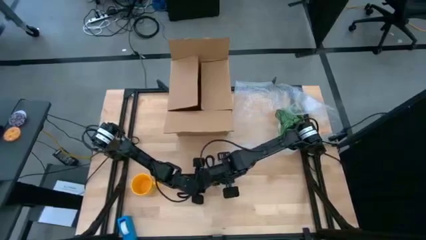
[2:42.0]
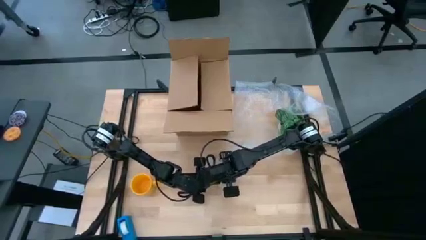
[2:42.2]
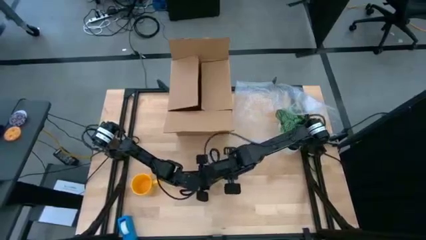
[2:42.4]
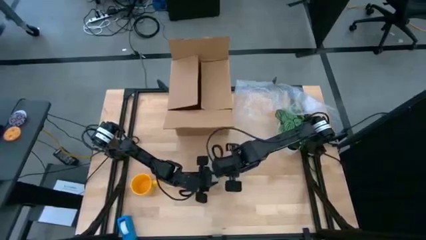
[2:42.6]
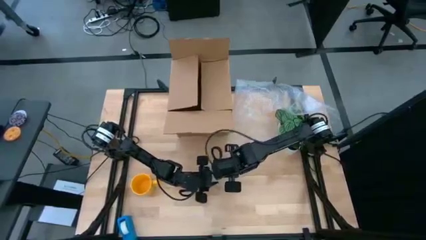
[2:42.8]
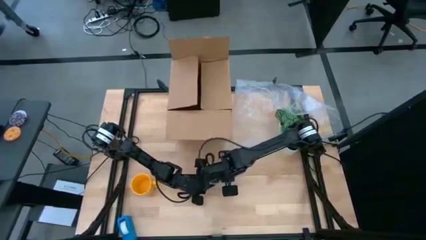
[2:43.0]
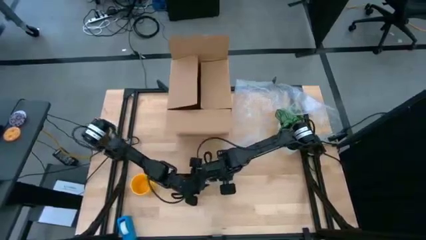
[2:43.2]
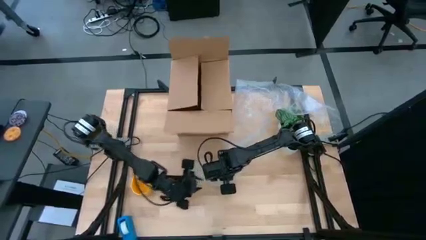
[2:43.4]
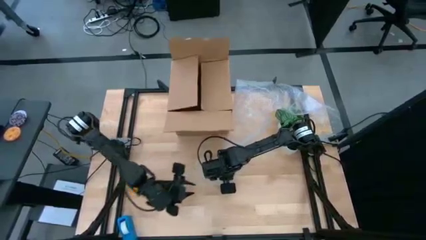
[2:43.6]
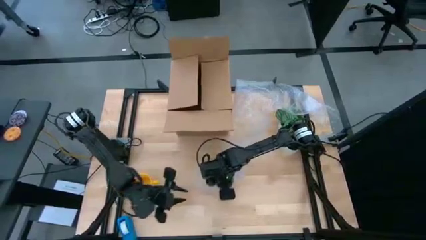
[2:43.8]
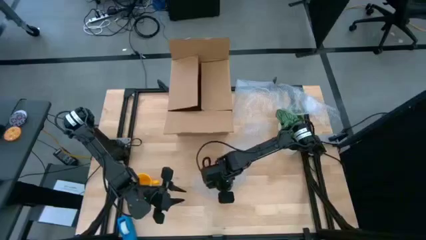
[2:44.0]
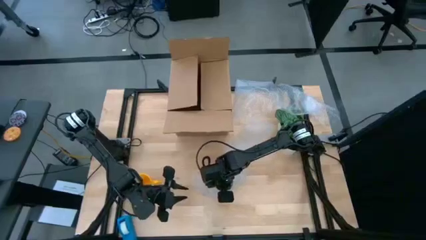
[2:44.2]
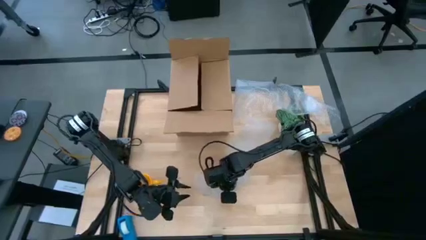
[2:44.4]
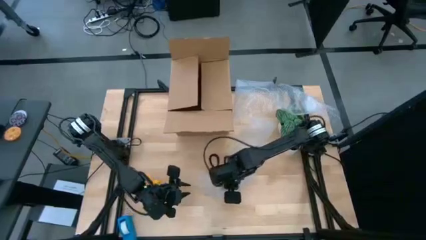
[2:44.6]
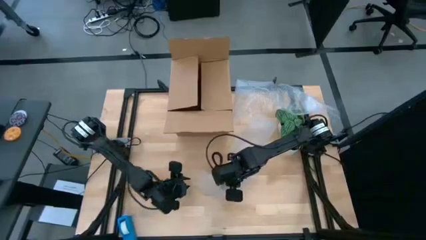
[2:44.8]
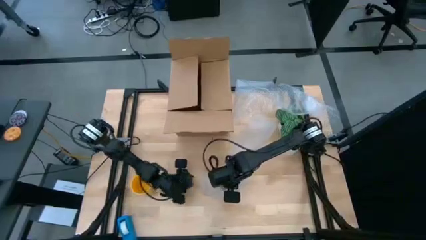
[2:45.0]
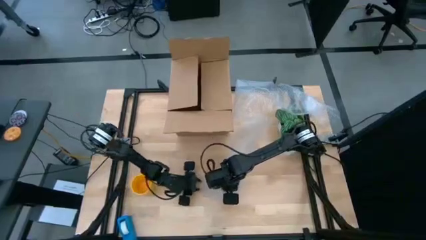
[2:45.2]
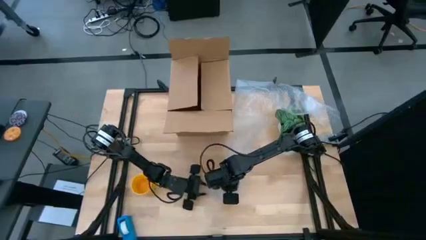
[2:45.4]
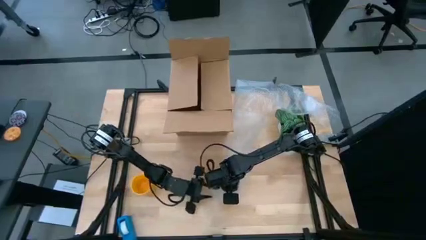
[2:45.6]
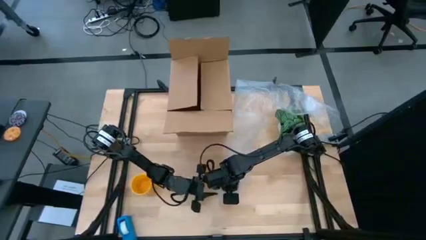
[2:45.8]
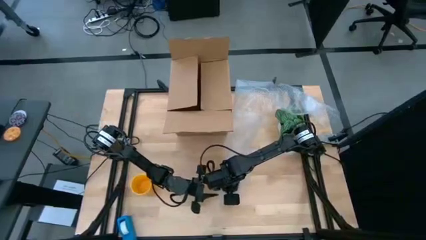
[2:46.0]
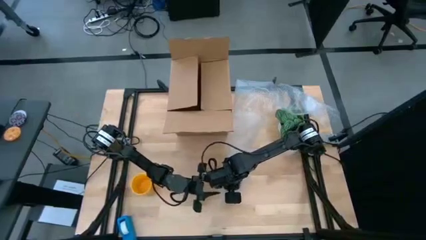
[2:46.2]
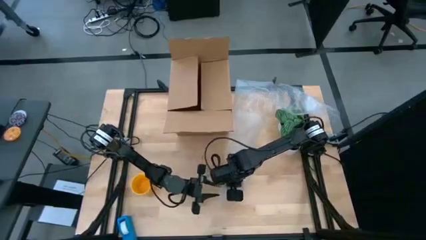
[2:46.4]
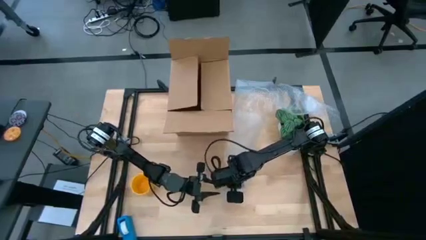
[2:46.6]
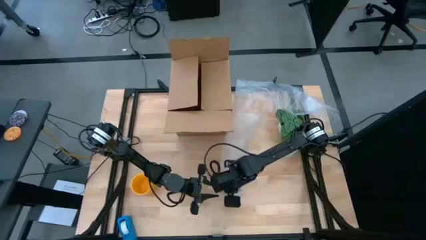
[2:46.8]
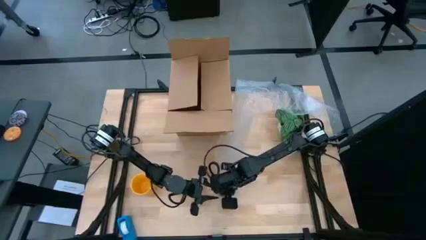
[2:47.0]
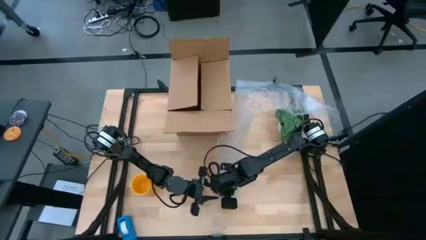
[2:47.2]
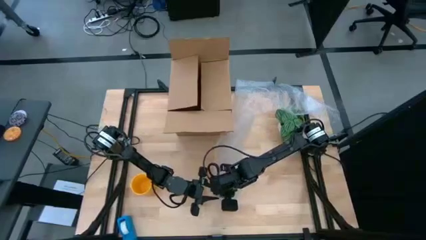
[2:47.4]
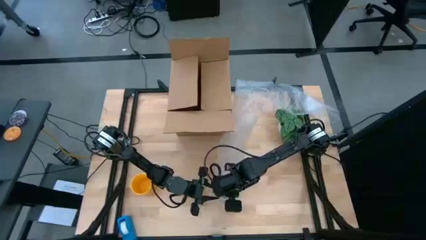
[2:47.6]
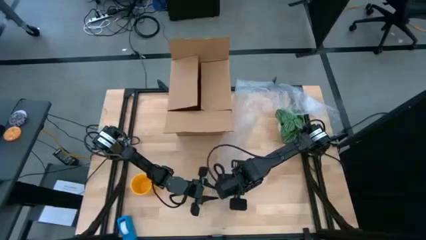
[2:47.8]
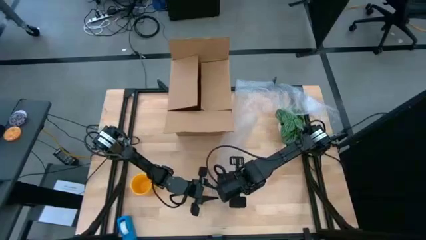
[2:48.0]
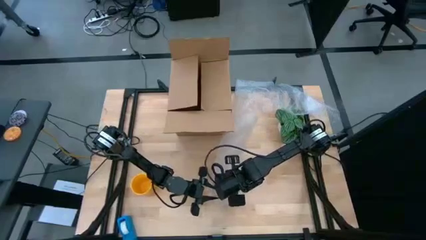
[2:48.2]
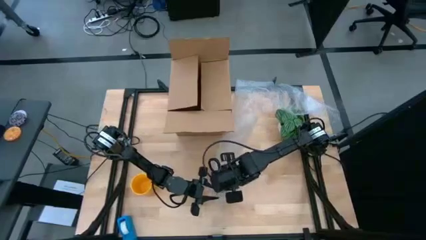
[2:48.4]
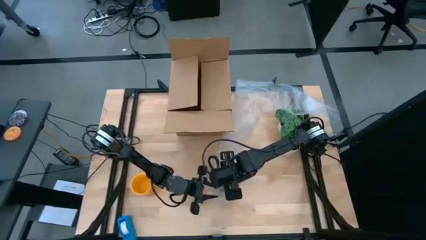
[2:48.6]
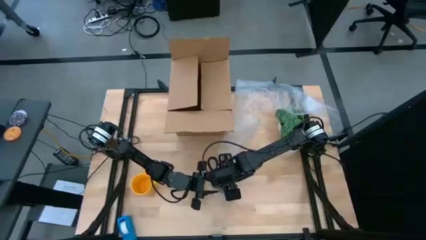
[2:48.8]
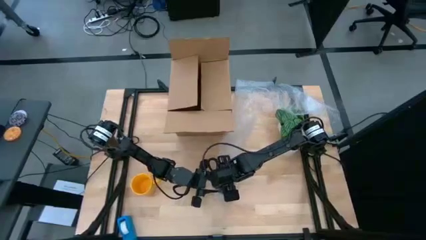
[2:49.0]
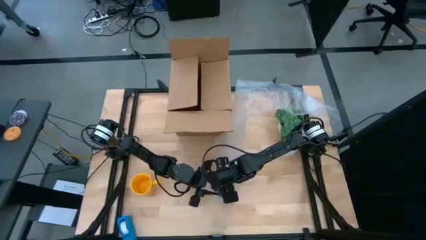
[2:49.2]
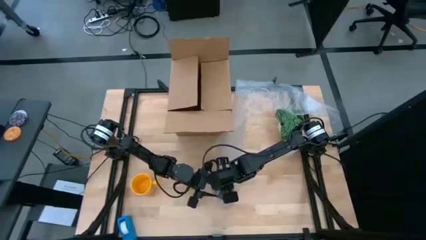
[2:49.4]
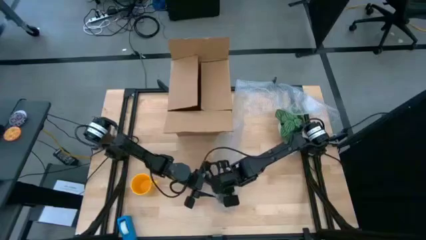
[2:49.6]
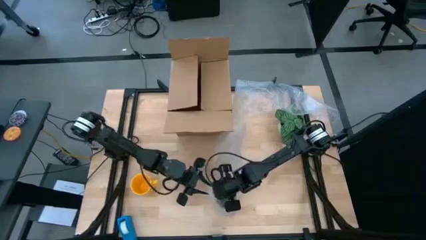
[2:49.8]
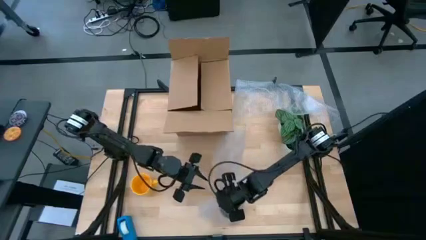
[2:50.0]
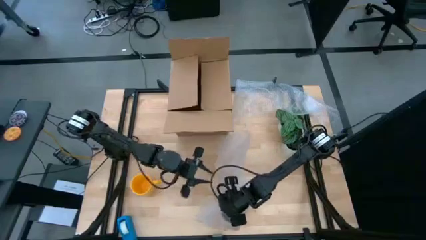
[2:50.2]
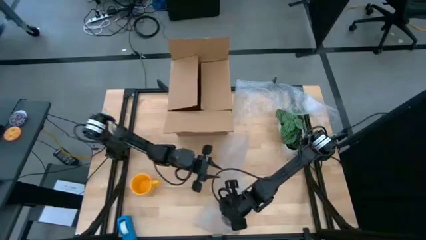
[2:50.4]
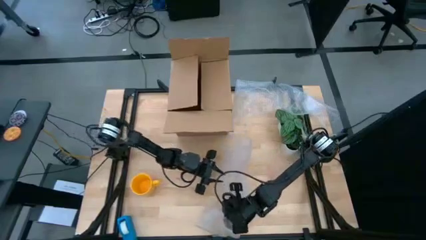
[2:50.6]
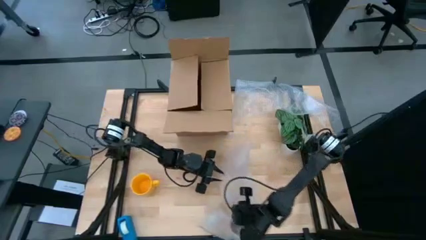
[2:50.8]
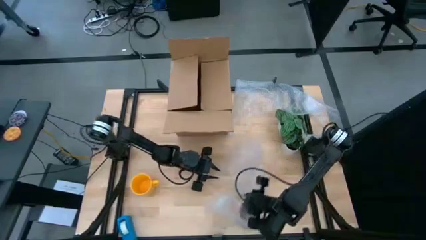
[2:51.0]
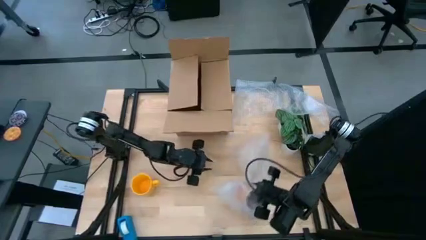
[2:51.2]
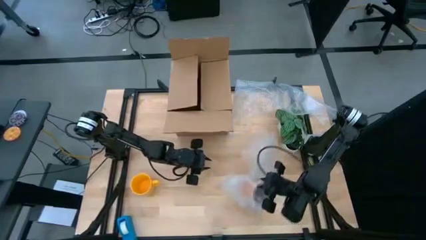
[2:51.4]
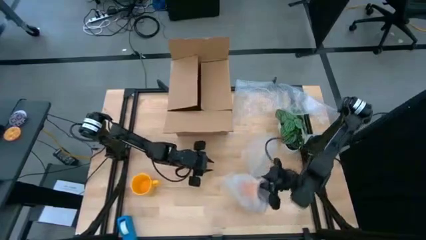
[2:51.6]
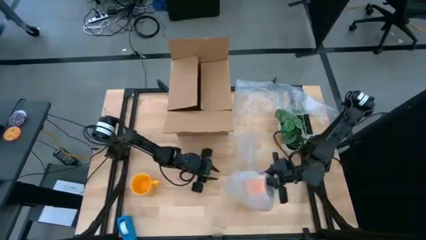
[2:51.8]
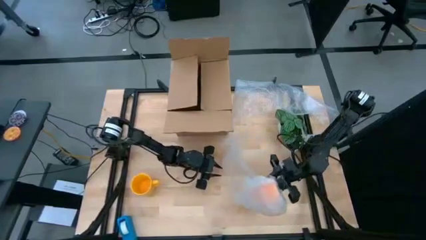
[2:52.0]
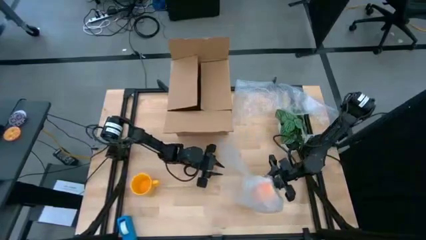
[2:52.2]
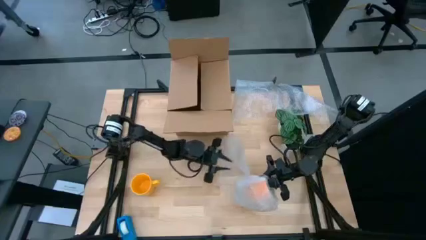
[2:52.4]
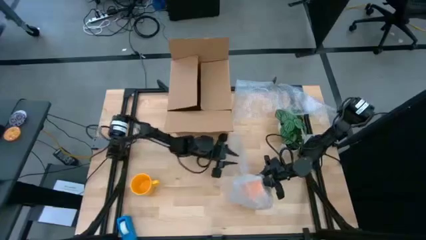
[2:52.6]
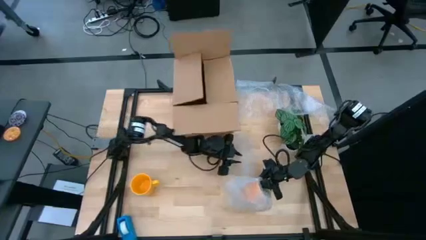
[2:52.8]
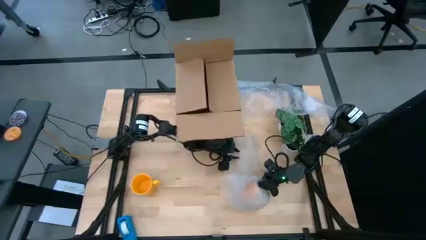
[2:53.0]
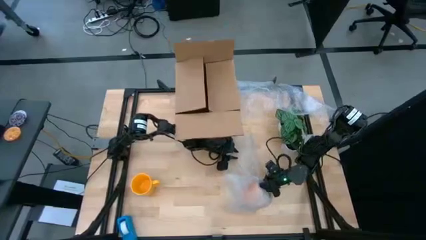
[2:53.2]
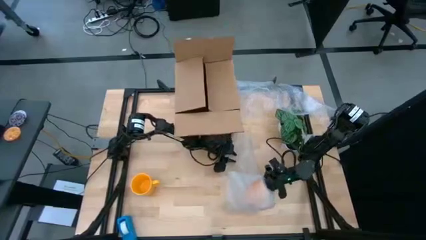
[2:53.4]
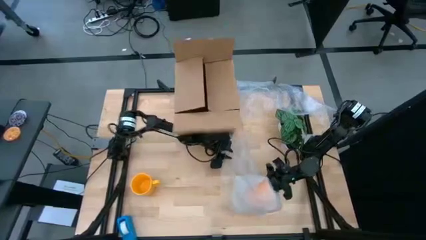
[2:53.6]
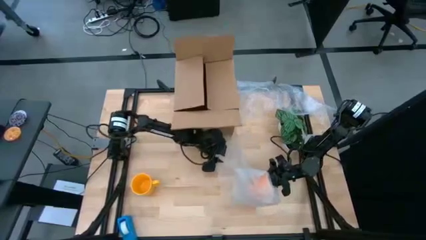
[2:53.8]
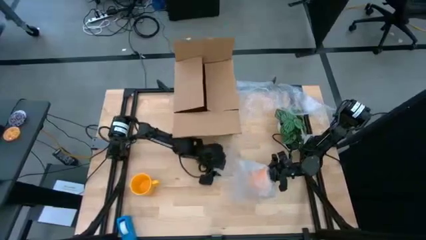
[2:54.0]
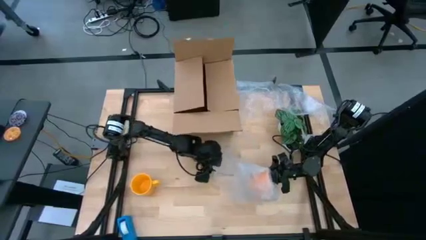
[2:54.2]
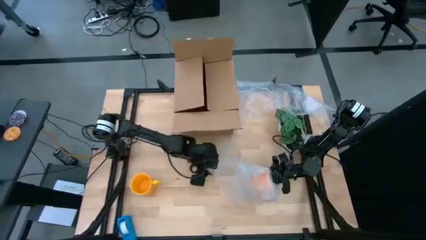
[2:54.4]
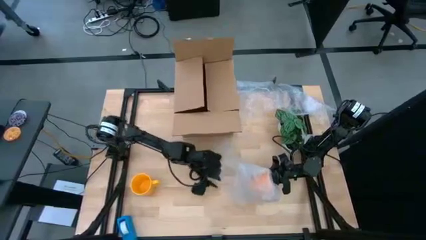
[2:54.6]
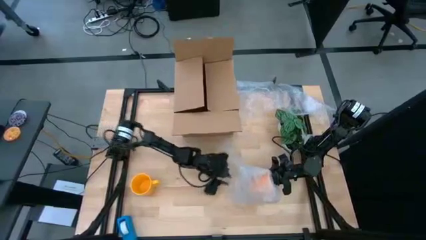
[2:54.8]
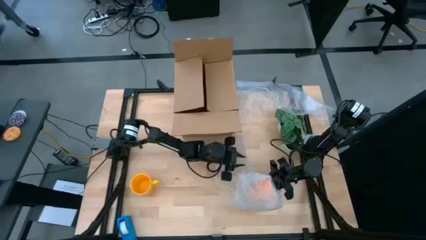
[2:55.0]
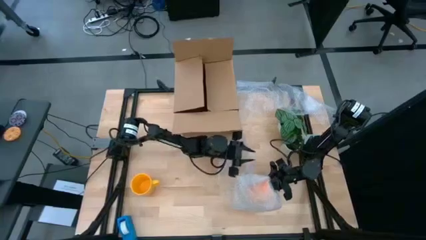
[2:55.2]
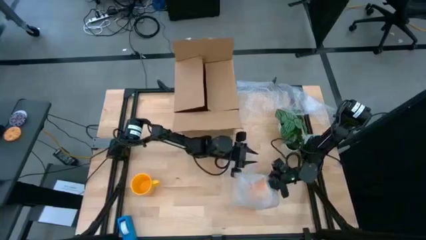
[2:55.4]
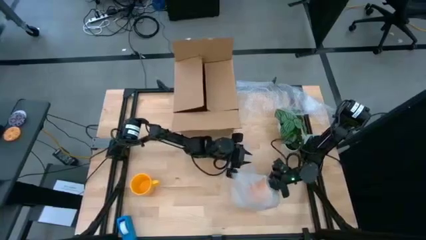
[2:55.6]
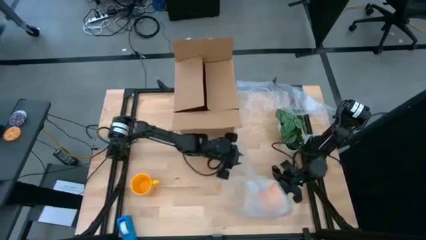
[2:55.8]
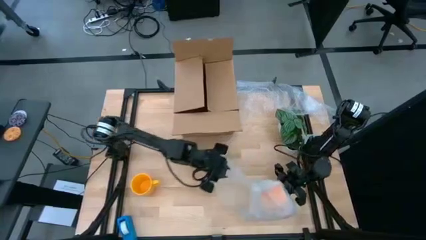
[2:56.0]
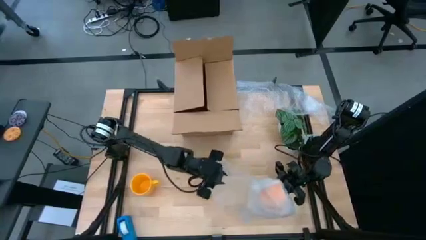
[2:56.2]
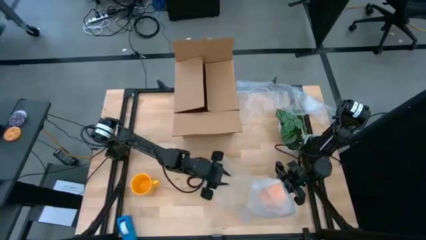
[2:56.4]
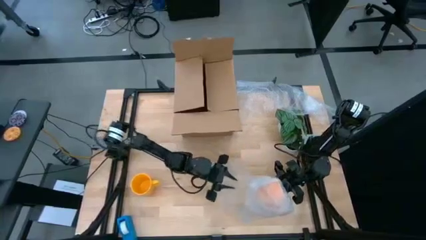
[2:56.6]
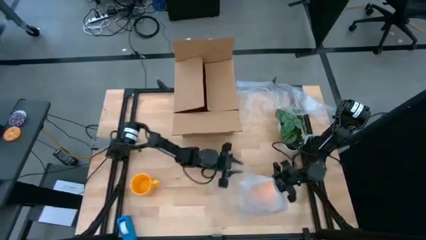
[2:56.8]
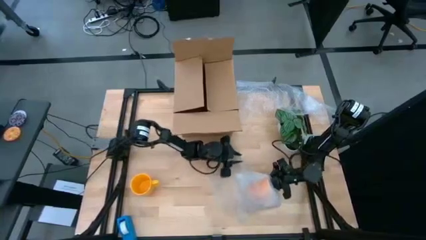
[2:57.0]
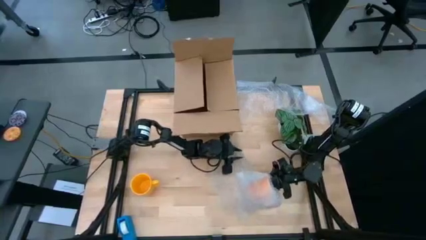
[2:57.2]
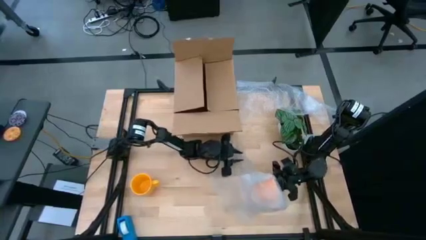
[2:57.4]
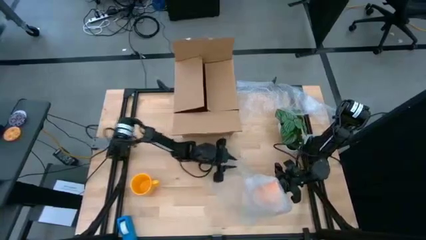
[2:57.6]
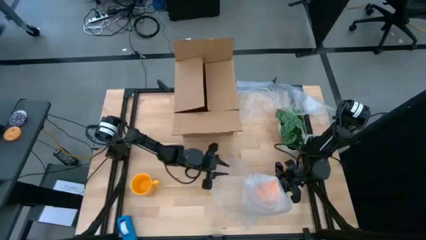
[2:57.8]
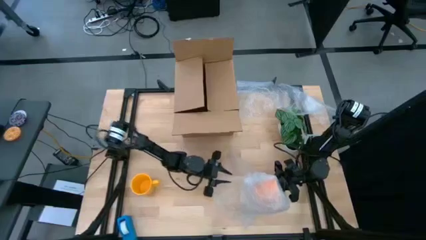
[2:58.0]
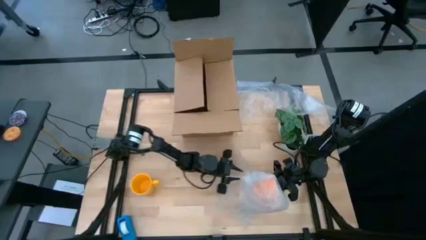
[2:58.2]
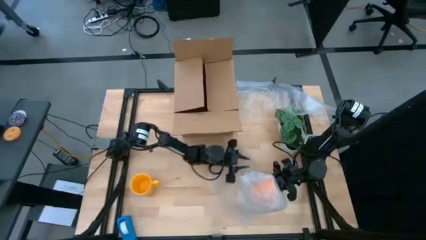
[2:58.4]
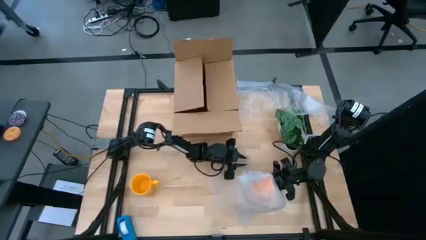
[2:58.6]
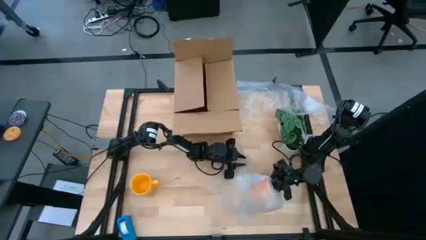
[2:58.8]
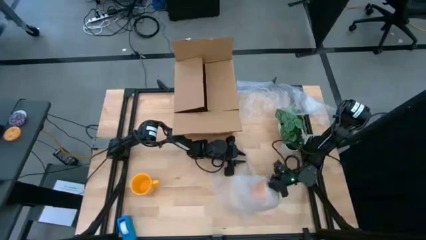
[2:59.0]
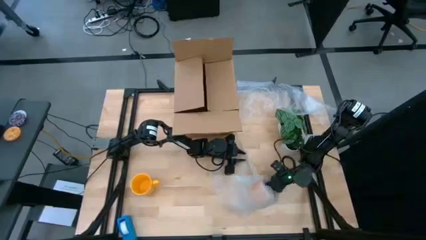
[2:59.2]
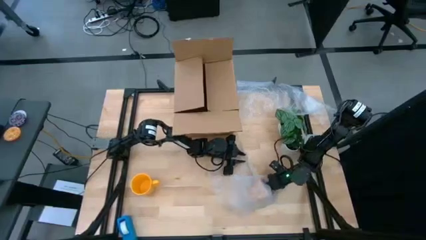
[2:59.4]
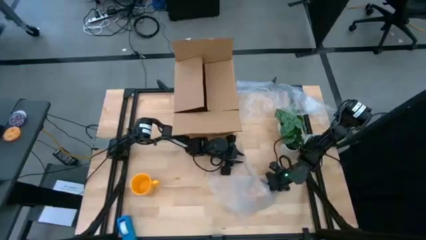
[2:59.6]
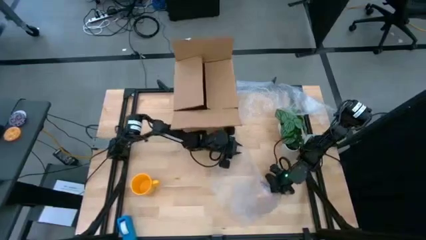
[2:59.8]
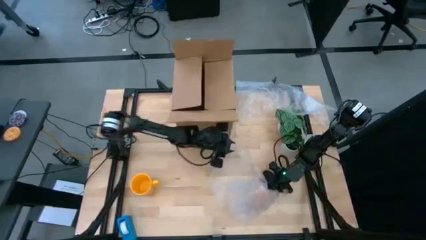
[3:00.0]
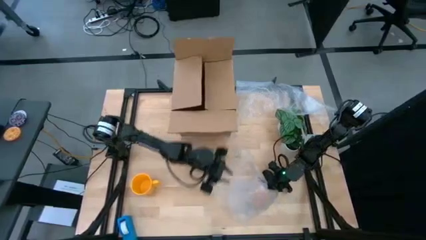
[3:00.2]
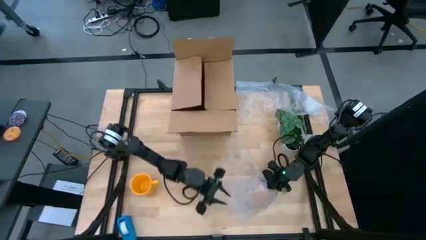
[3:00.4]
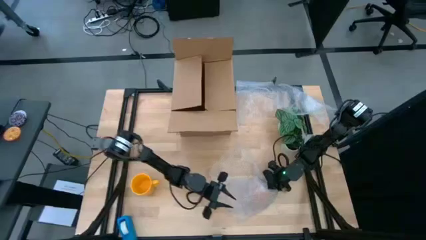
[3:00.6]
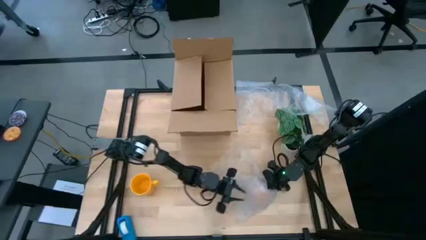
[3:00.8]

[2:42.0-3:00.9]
Task: wrap mug
Wrap the orange cup with the bubble wrap
